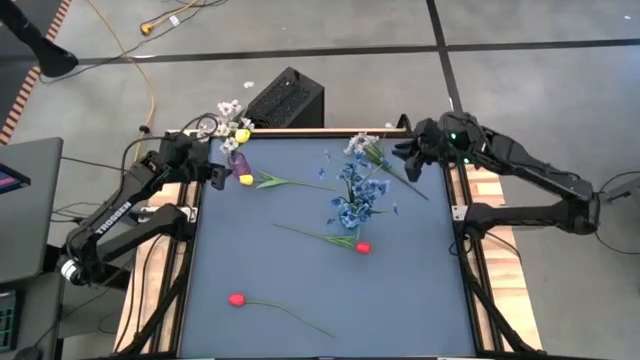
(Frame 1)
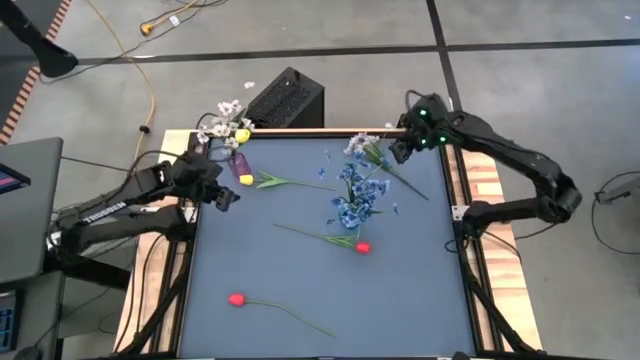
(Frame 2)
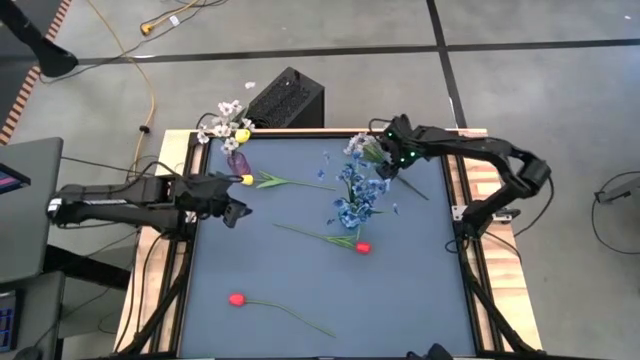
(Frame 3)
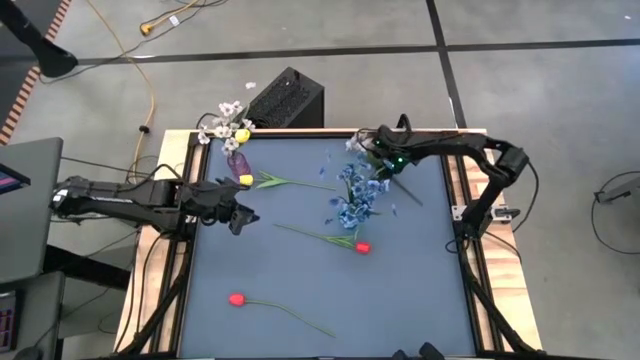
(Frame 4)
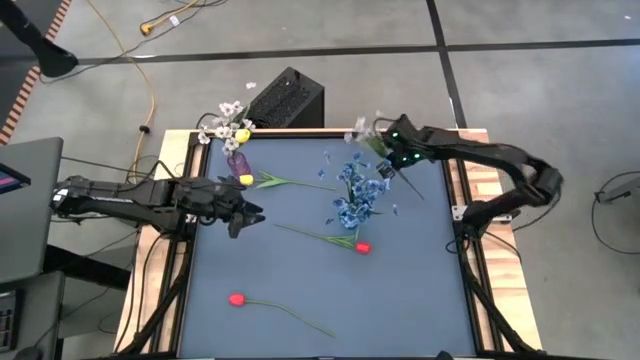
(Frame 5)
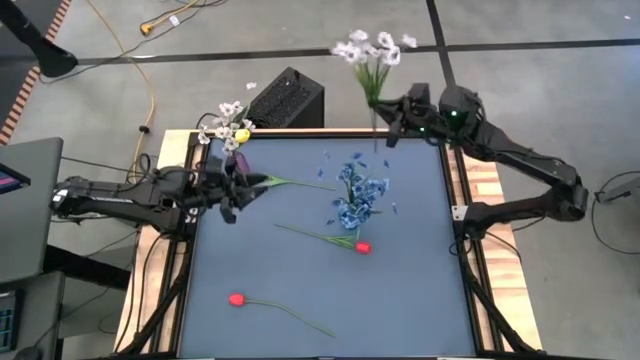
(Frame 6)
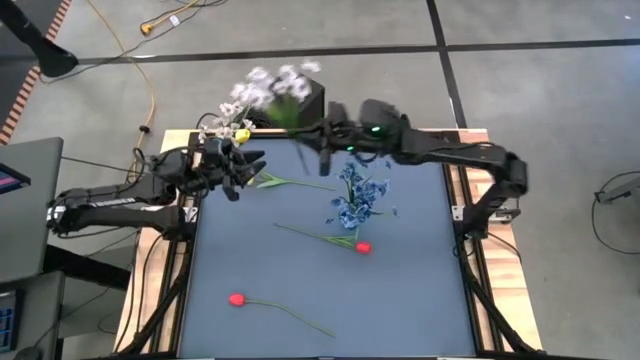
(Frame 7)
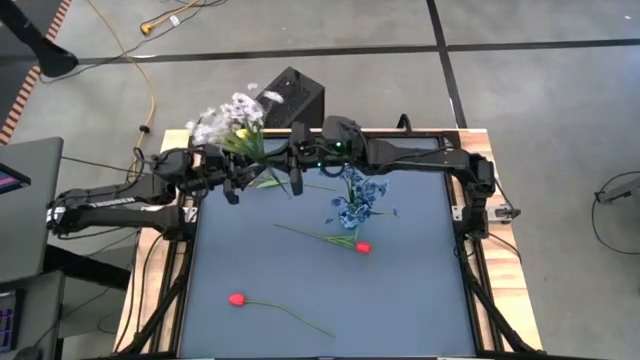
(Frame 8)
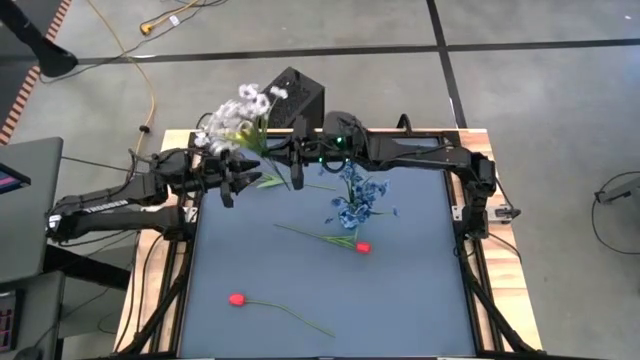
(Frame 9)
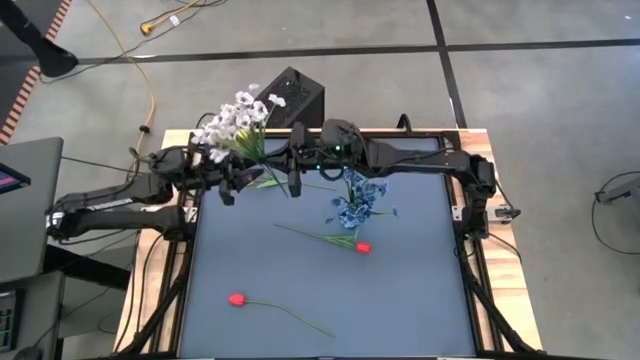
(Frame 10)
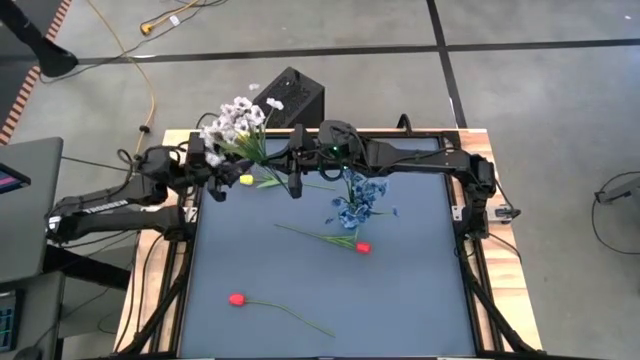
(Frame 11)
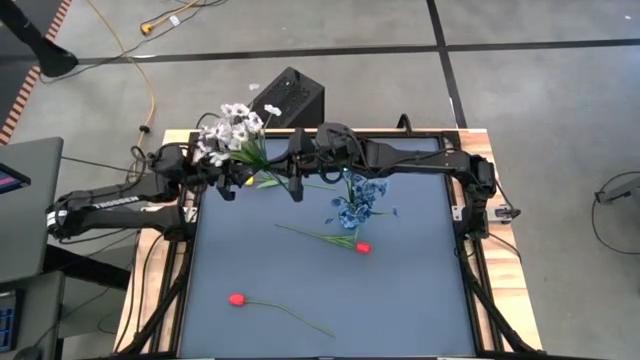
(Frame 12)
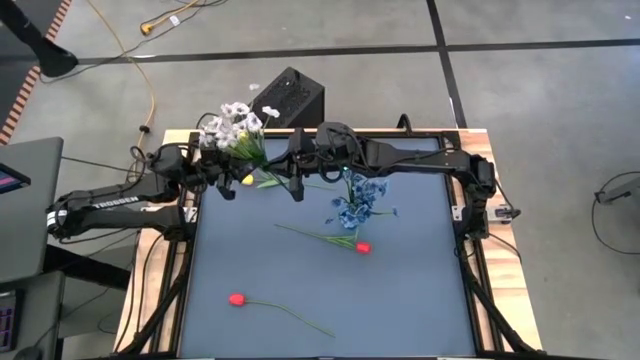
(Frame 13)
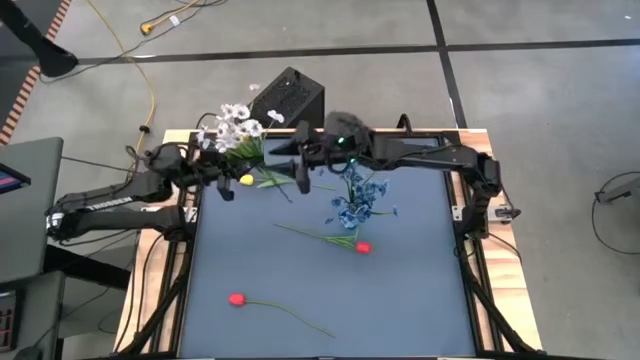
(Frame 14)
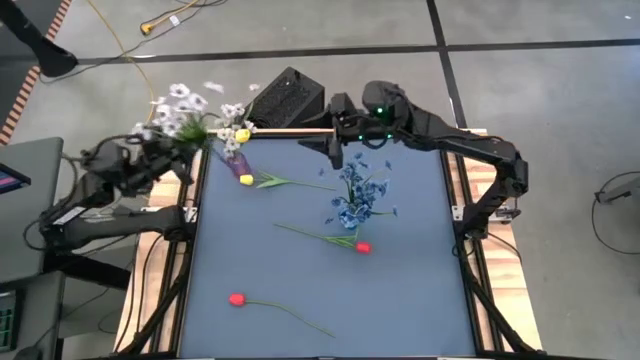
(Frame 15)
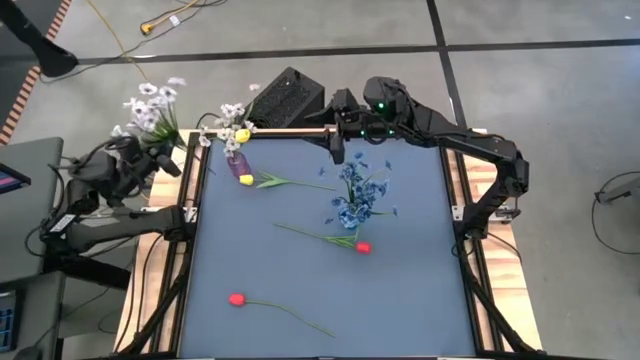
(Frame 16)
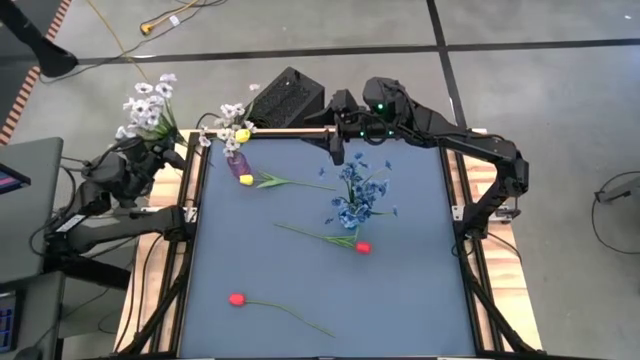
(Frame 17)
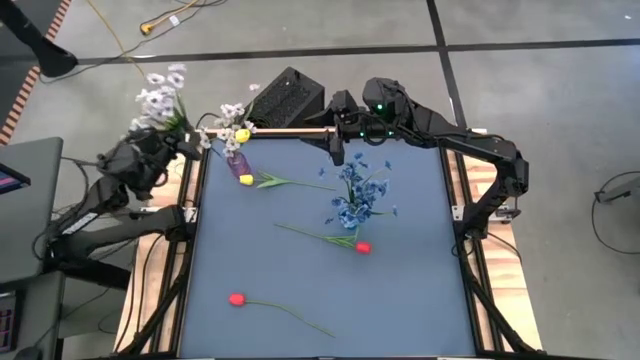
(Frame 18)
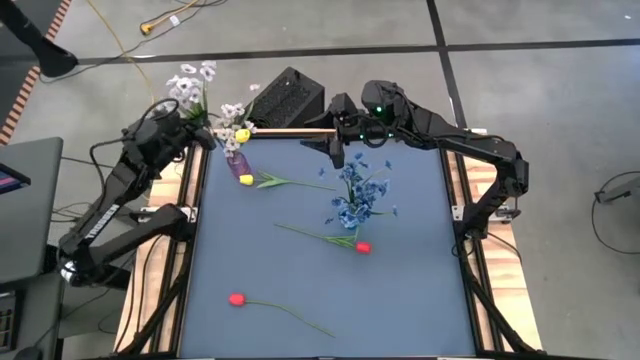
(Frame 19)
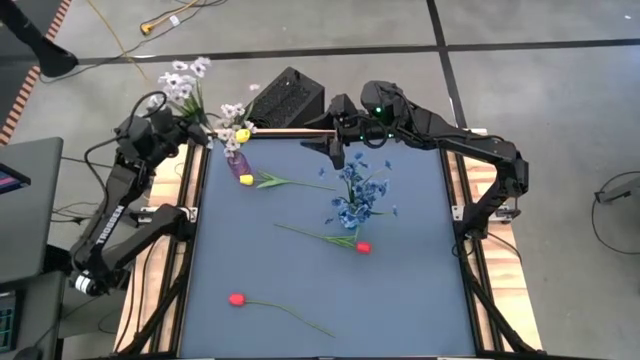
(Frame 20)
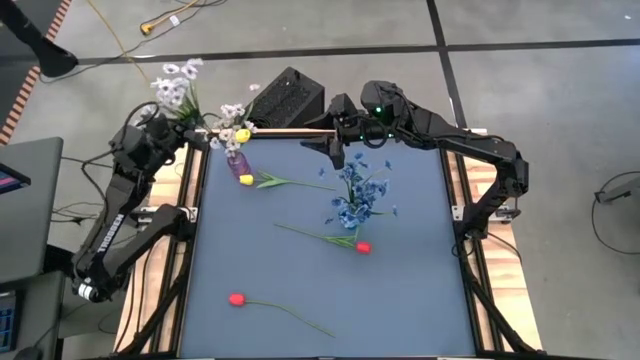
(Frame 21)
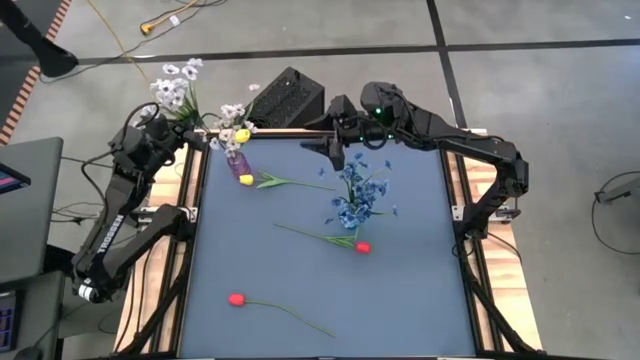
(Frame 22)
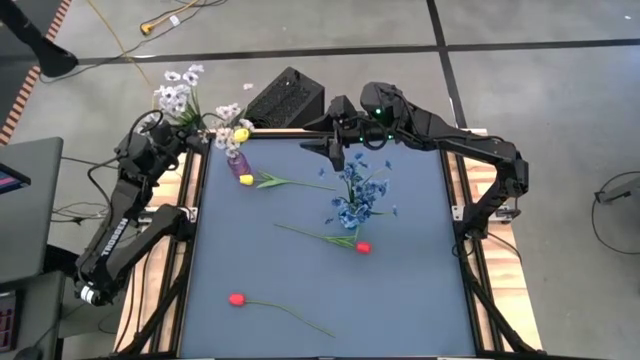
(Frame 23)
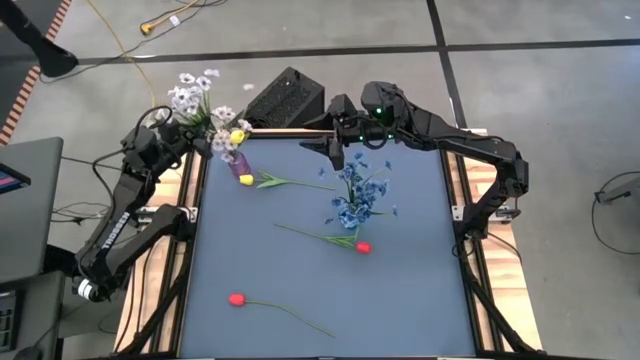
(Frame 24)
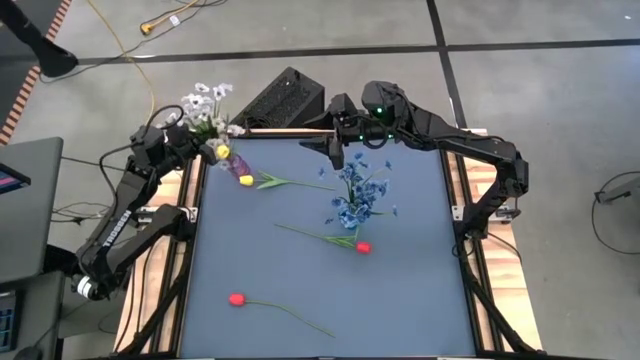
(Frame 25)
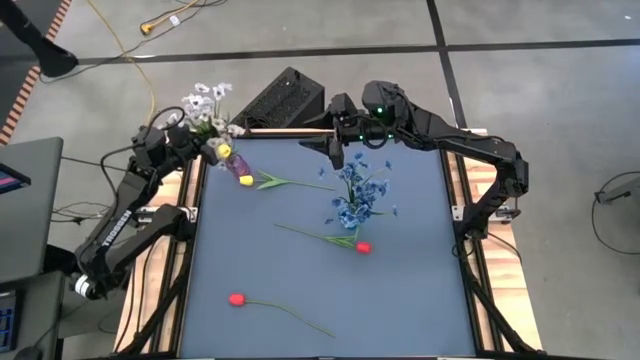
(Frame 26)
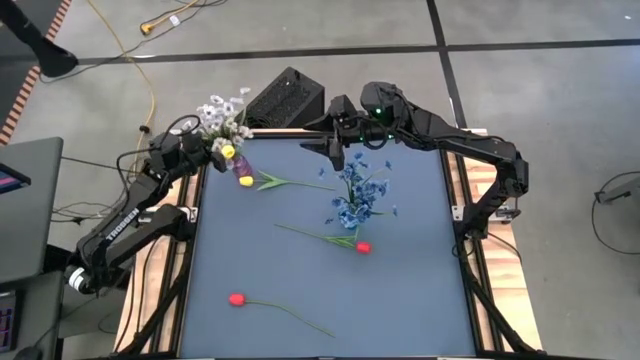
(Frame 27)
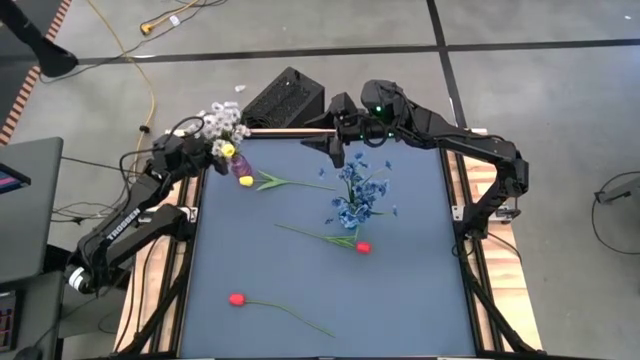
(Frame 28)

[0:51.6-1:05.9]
Task: Sort flowers into vase by color
Put the white flowers into the purple vase

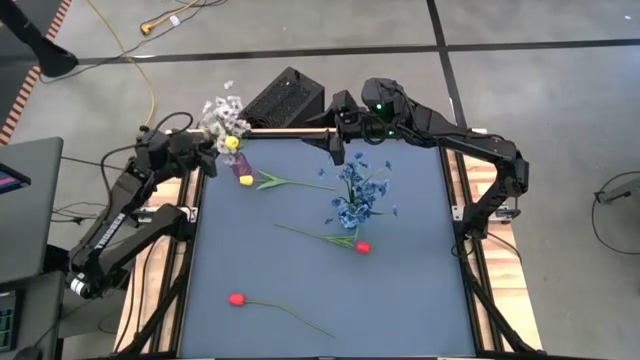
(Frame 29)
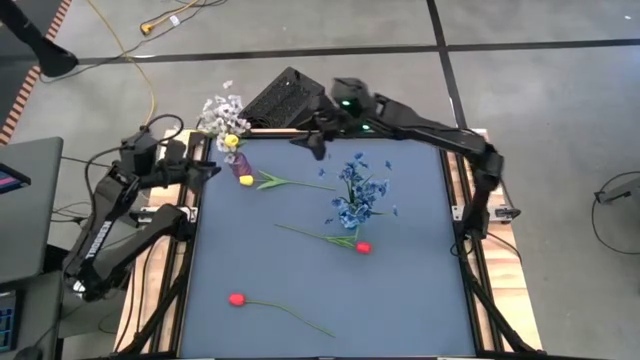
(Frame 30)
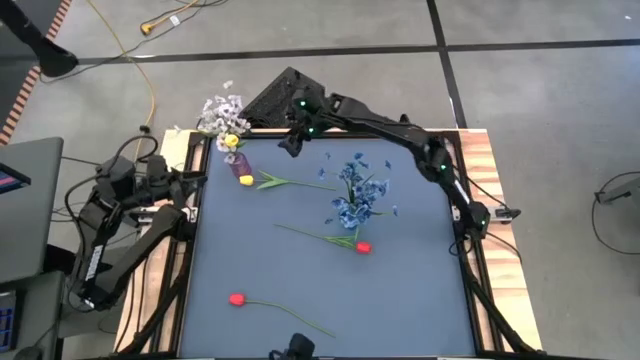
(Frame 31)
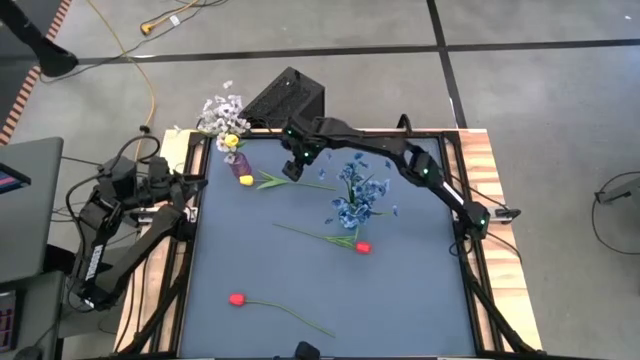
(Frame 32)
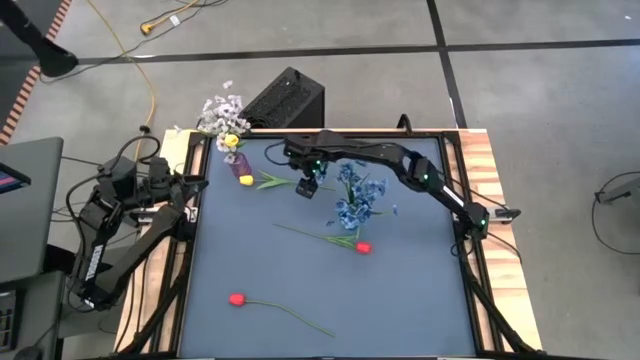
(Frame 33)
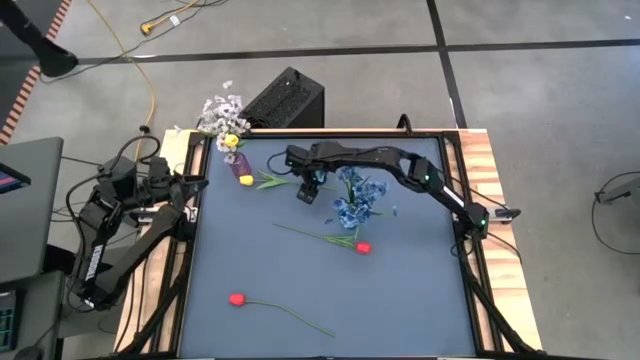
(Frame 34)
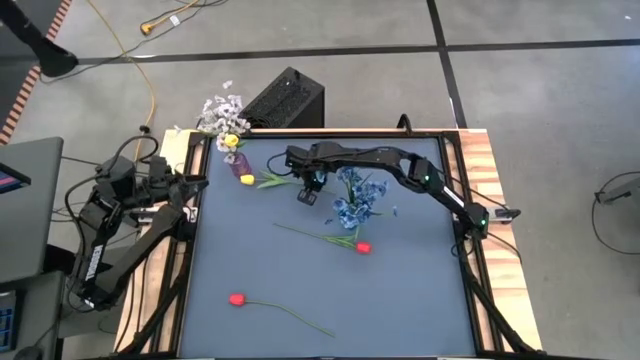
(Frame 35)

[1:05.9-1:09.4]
Put the yellow flower into the purple vase

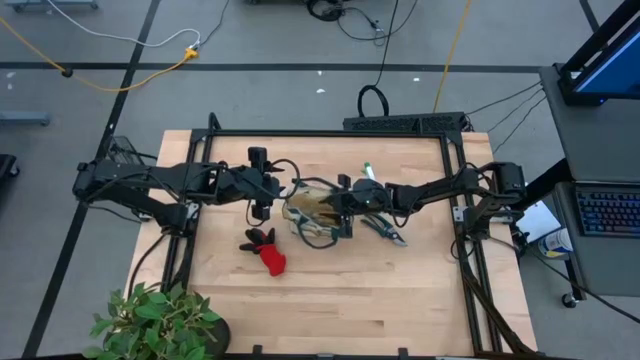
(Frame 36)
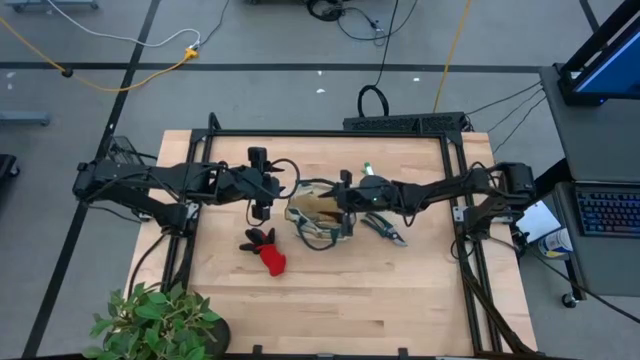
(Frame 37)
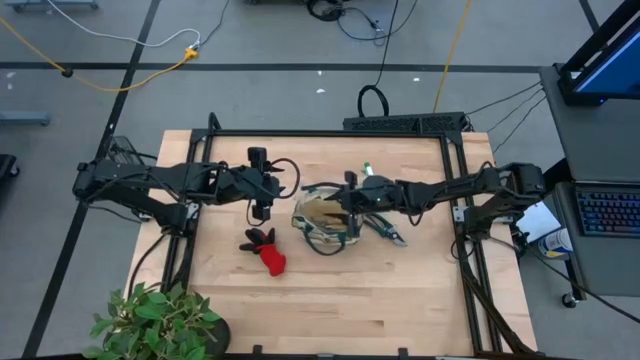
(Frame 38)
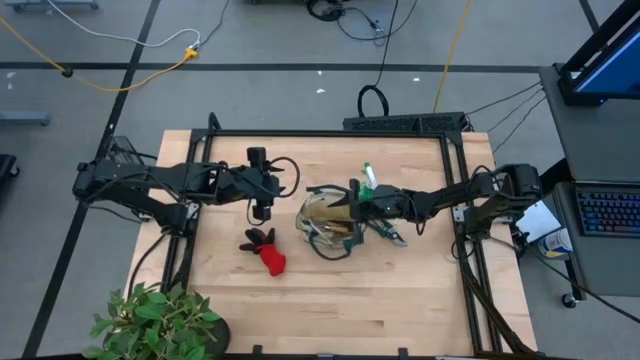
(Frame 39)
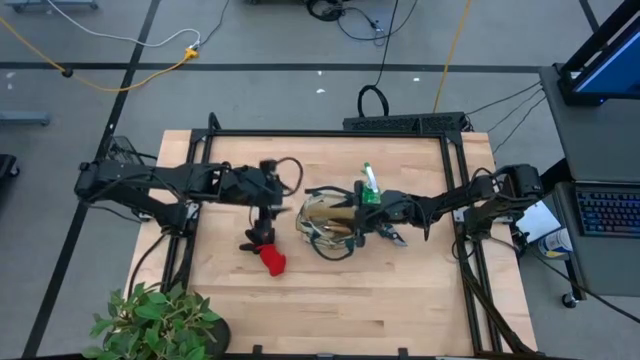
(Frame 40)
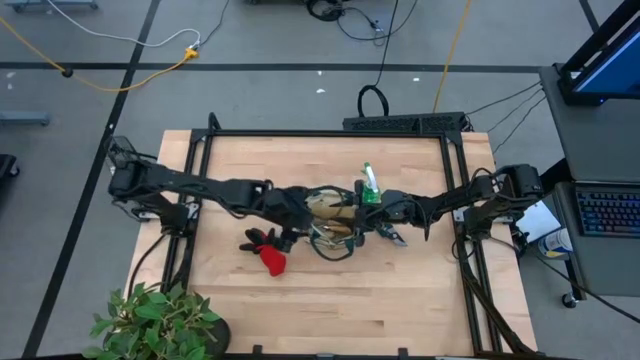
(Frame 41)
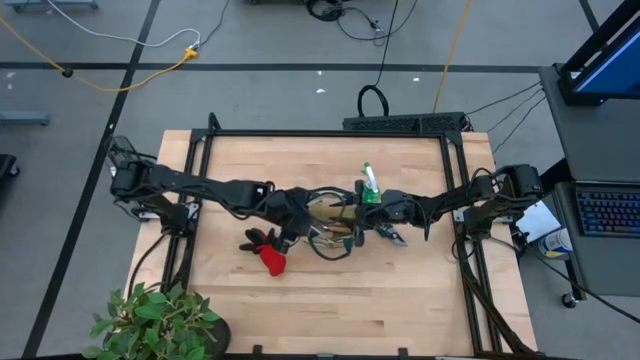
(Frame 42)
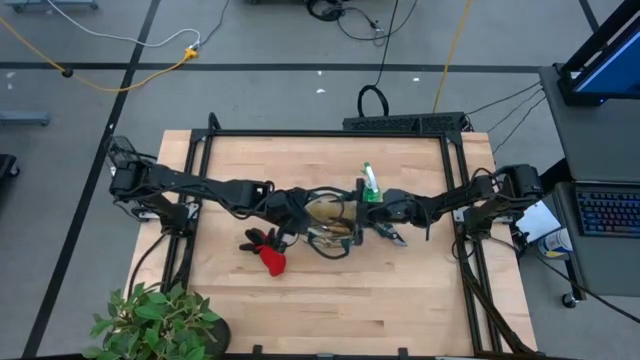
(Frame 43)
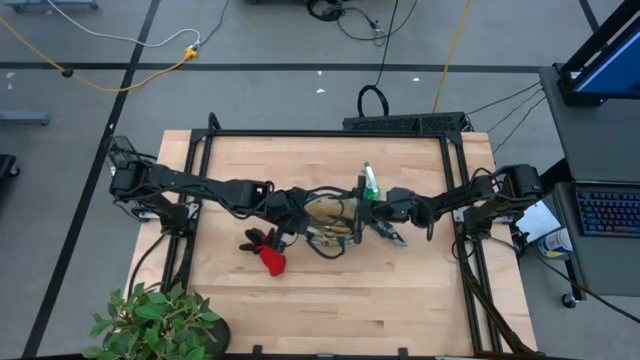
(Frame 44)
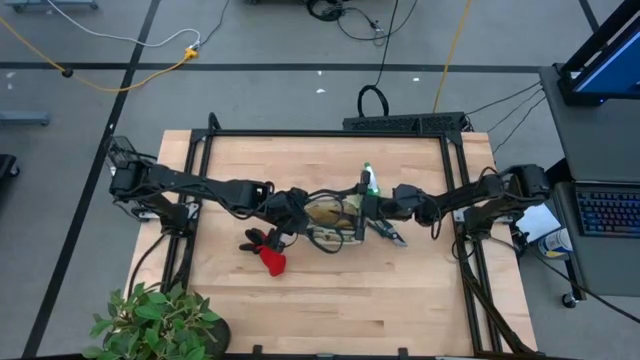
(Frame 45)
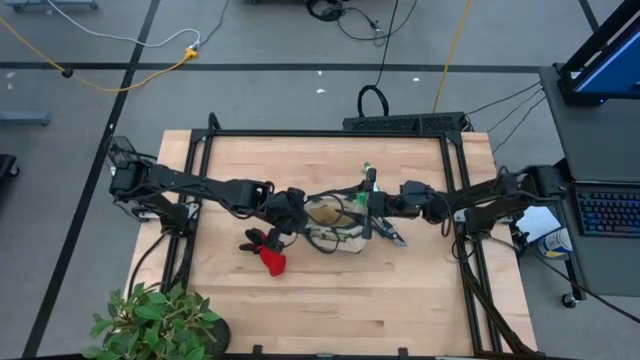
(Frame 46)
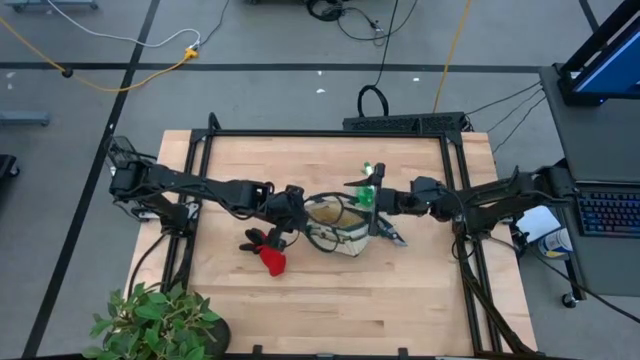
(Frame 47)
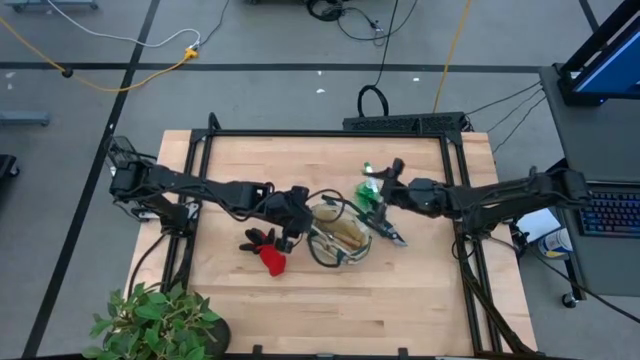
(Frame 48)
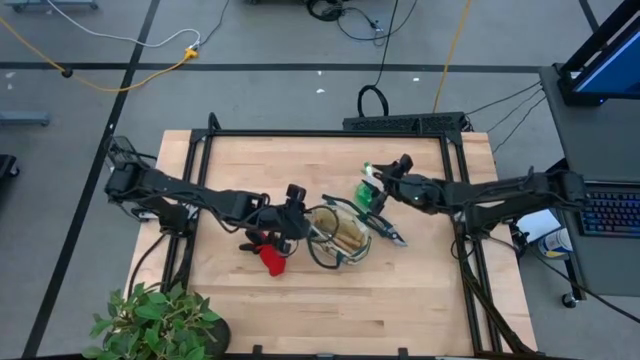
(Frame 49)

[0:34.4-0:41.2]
Task: Pick & Place Garden tools in Gardening bag
Adjust the light brown gardening bag
